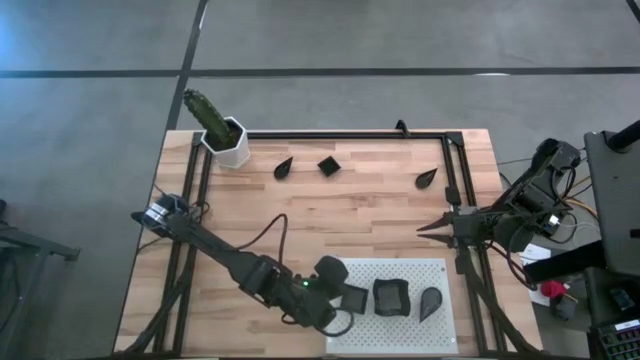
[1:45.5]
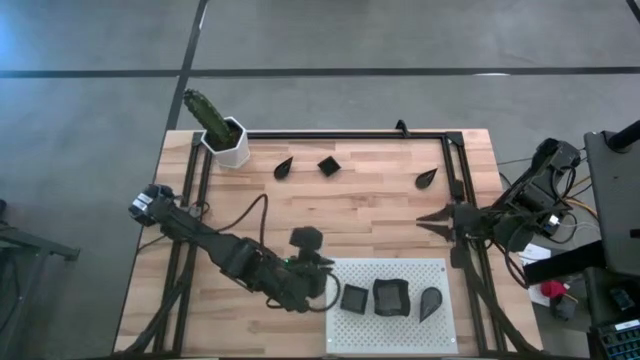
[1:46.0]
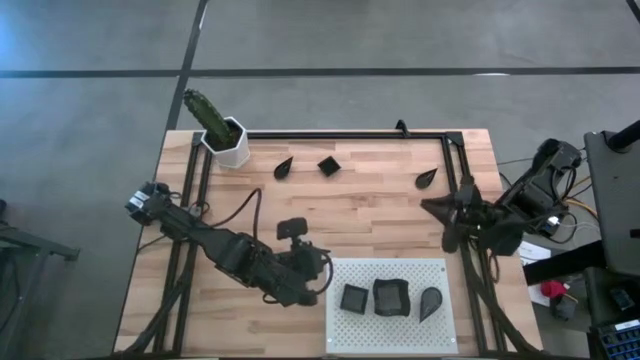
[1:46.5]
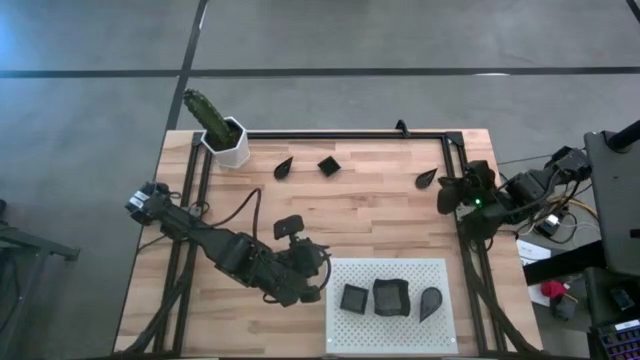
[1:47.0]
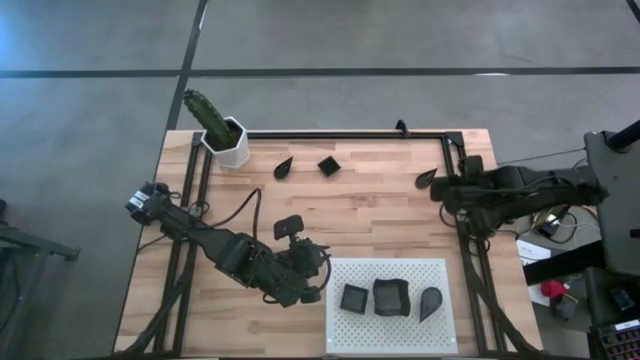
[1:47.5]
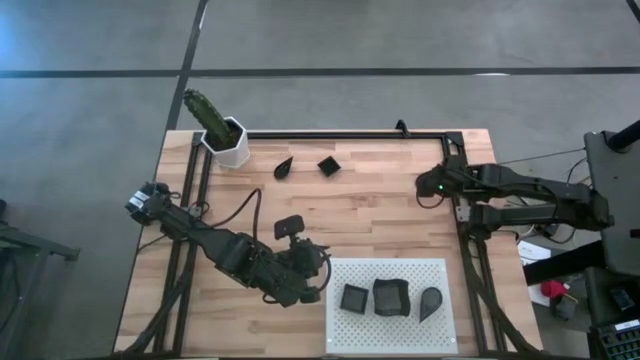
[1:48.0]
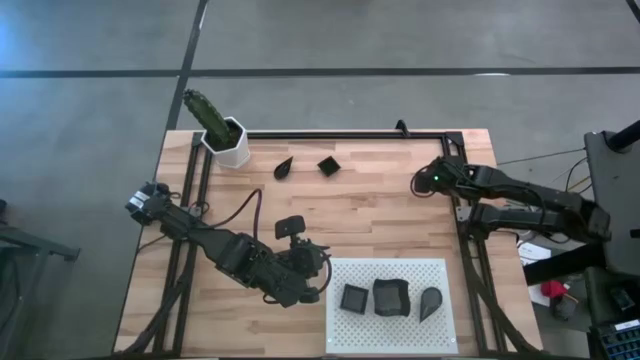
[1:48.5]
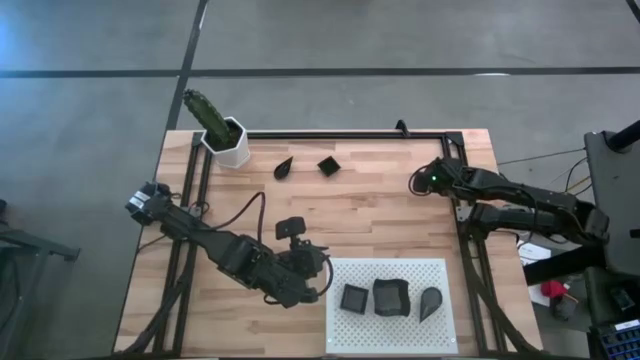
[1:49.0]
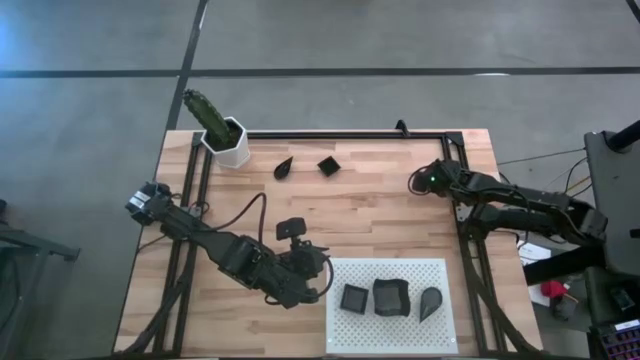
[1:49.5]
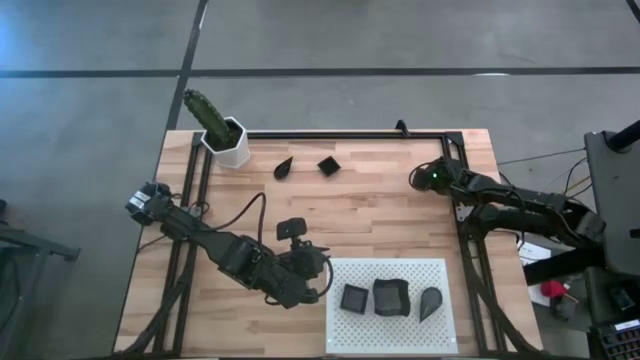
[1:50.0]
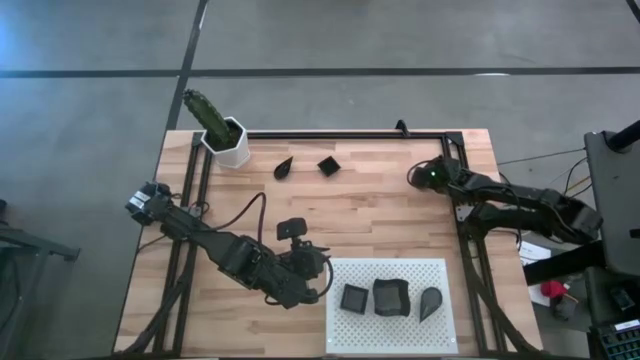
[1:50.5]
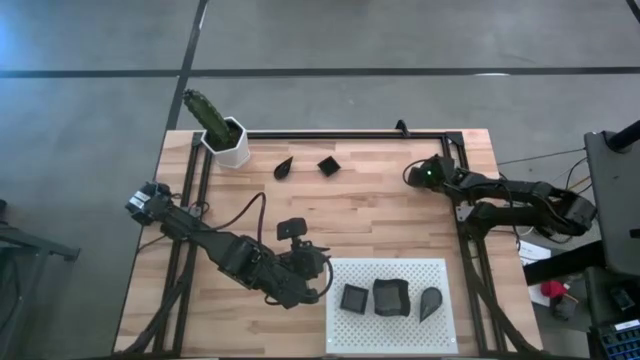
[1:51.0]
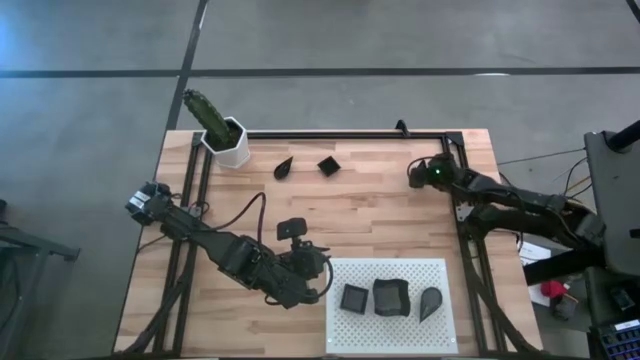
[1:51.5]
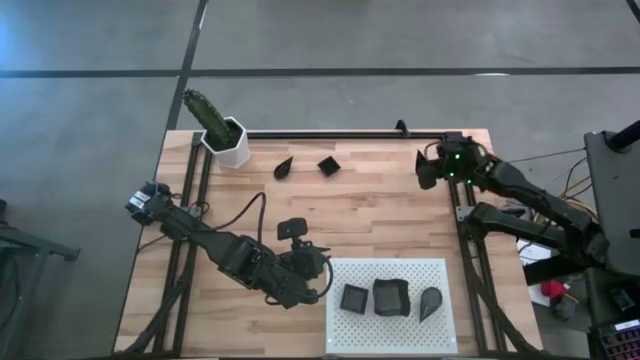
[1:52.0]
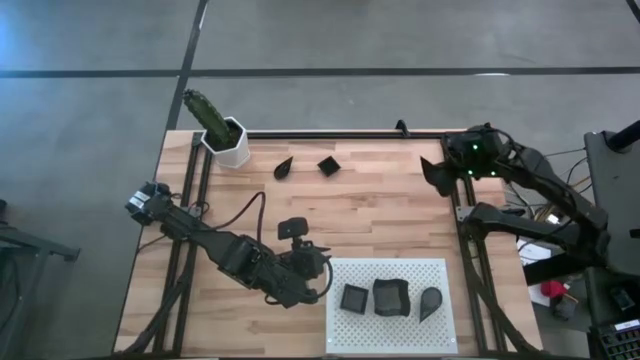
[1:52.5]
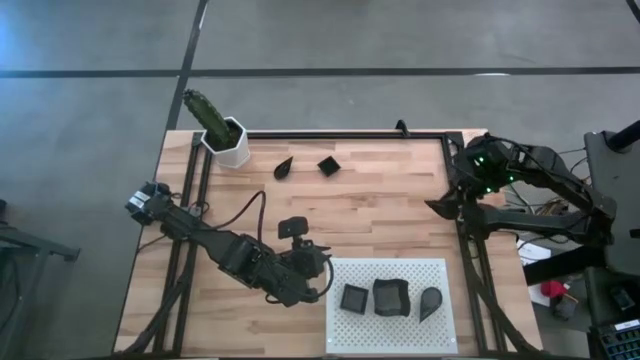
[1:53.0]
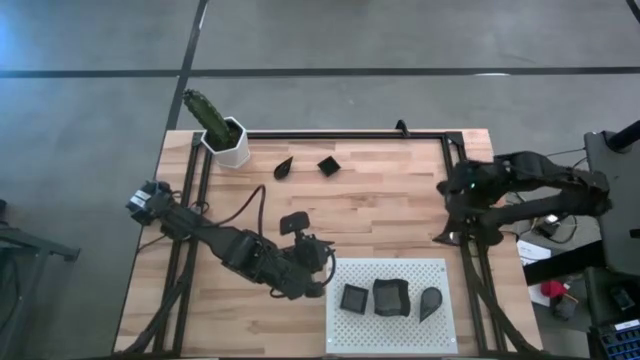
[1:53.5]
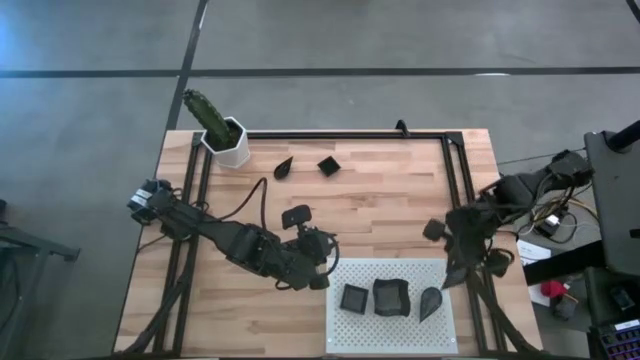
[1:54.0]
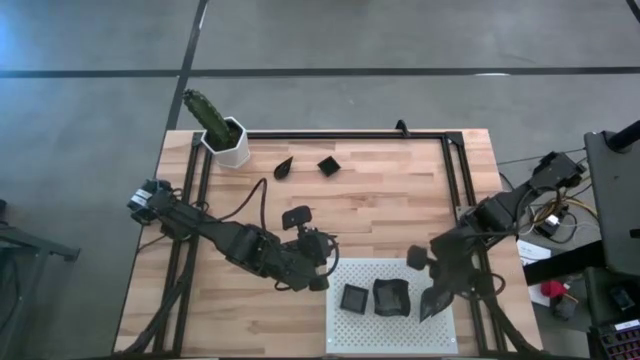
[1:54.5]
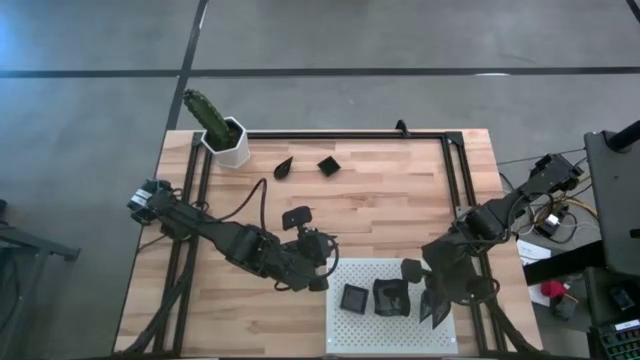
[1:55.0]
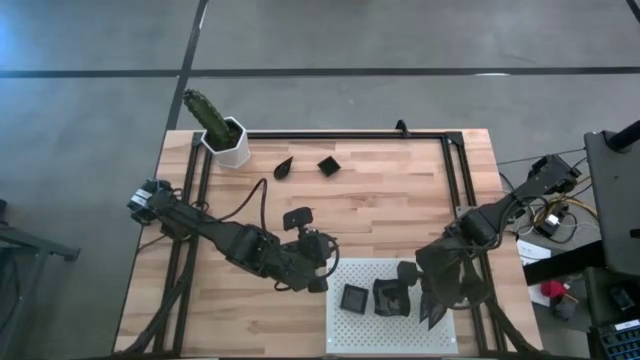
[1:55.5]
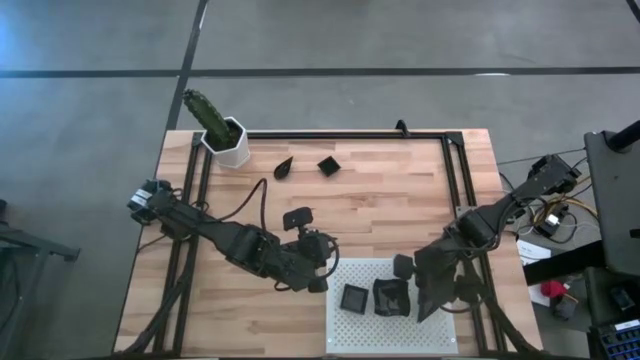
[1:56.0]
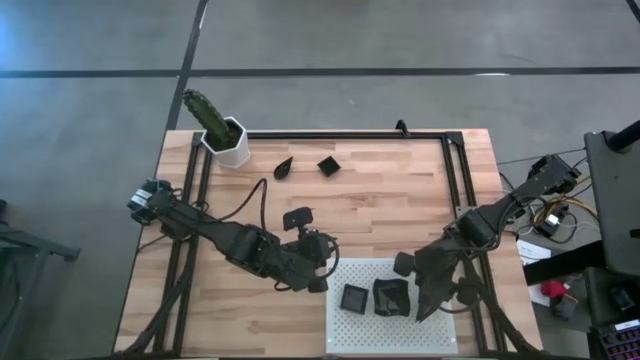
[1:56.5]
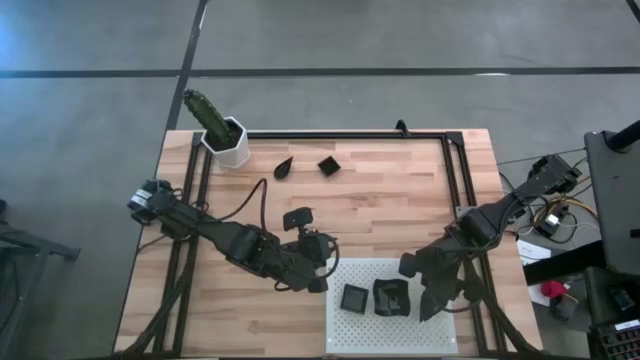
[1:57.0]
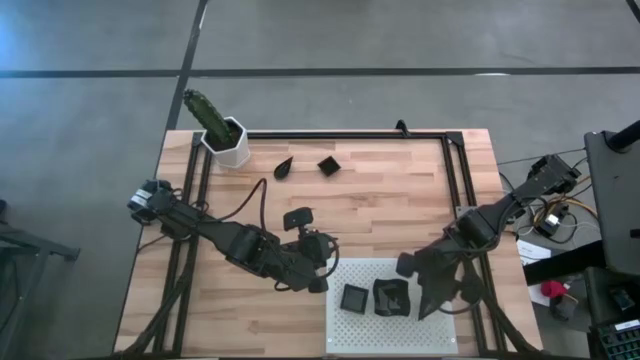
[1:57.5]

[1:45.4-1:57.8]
Task: Pick & Place Mini shaped plates
Stack the drop-shaped plate on top of the drop-shaped plate on the shelf

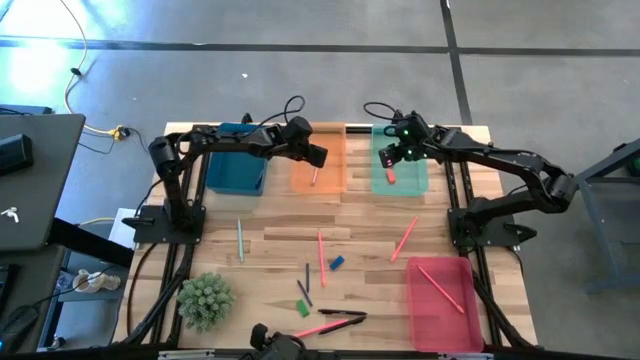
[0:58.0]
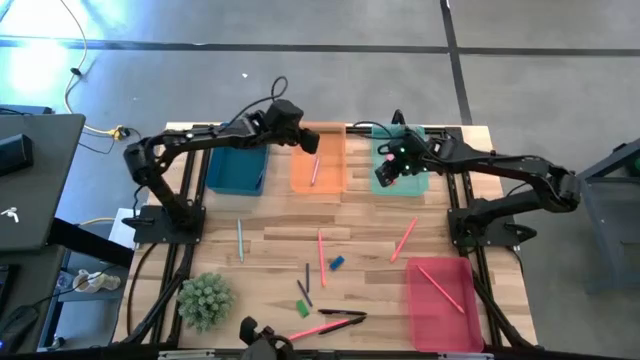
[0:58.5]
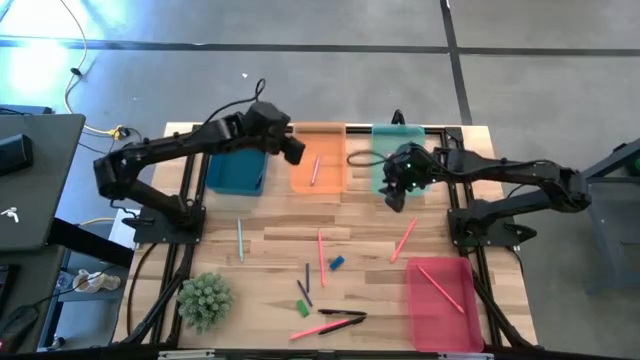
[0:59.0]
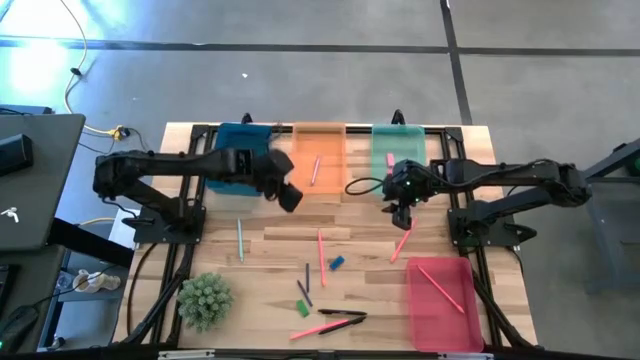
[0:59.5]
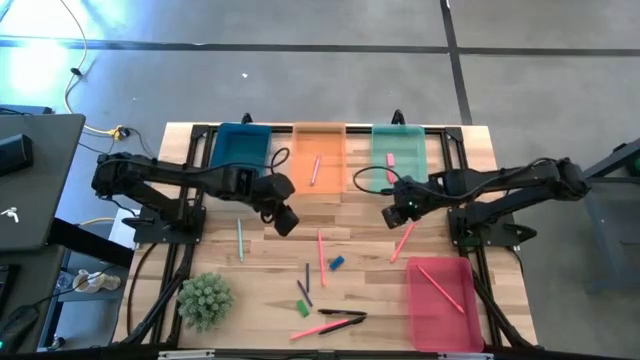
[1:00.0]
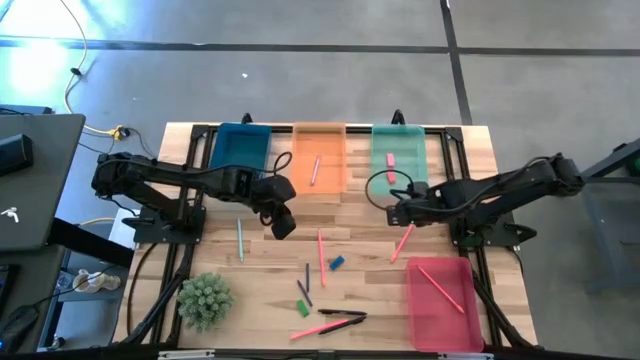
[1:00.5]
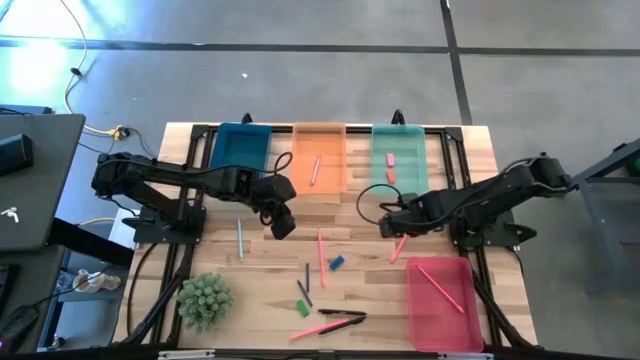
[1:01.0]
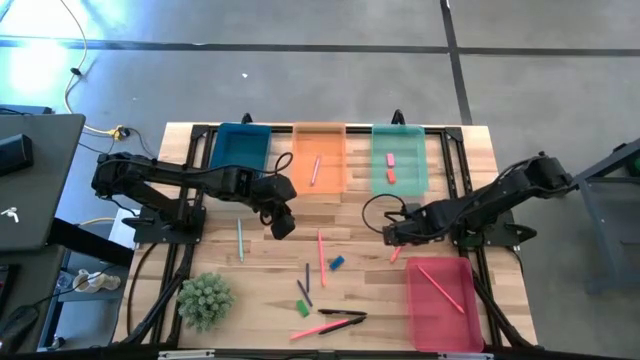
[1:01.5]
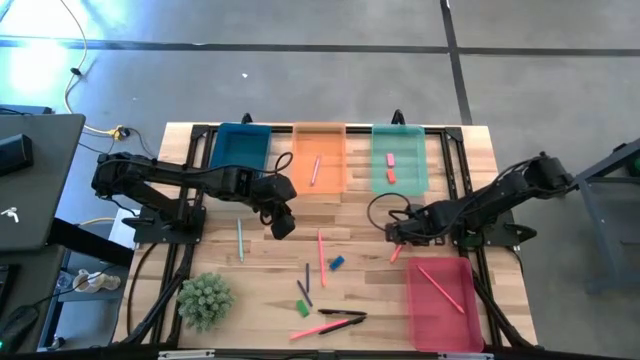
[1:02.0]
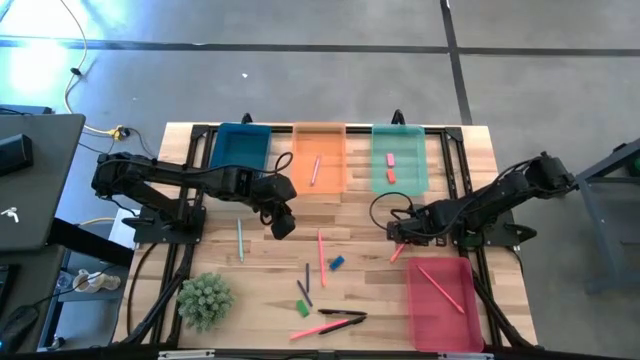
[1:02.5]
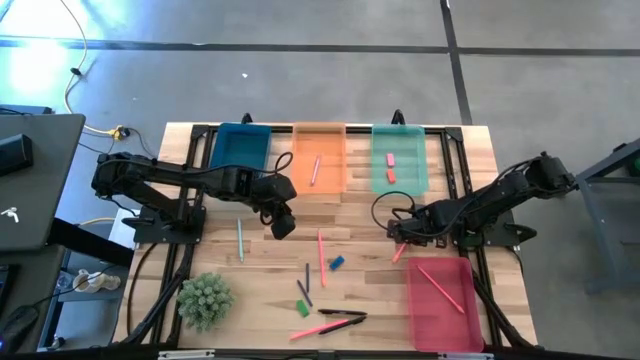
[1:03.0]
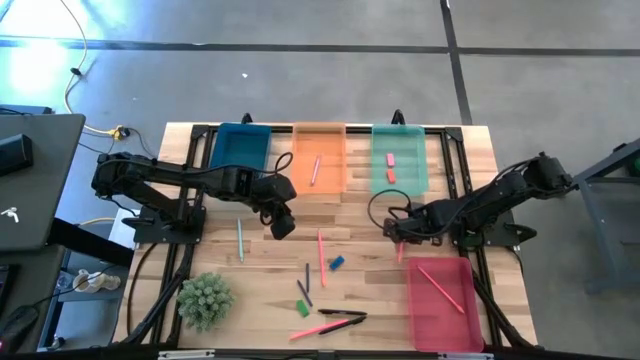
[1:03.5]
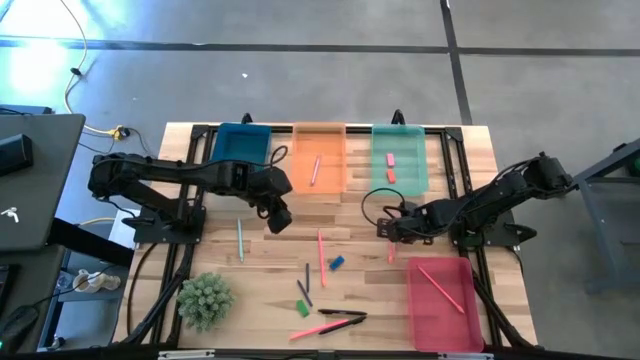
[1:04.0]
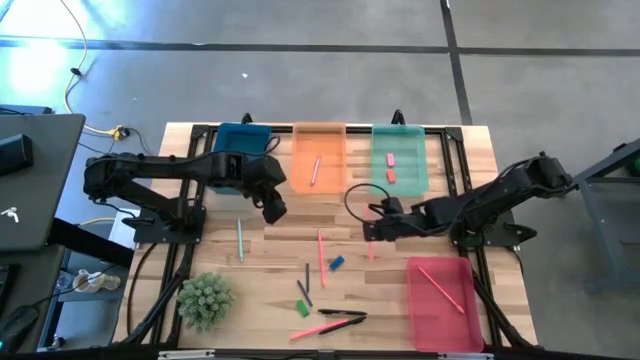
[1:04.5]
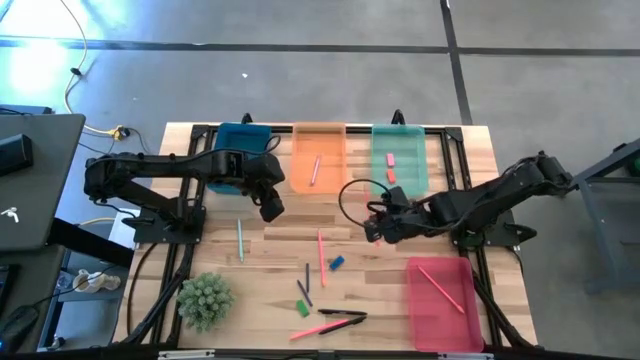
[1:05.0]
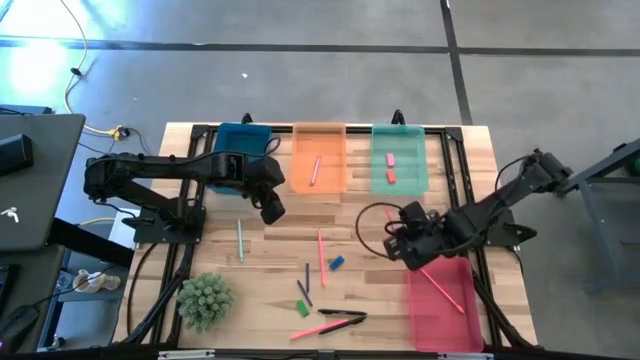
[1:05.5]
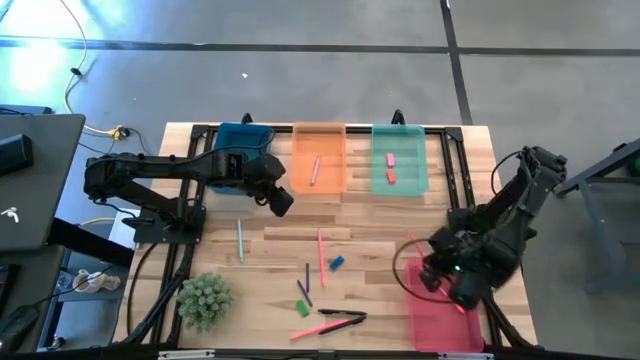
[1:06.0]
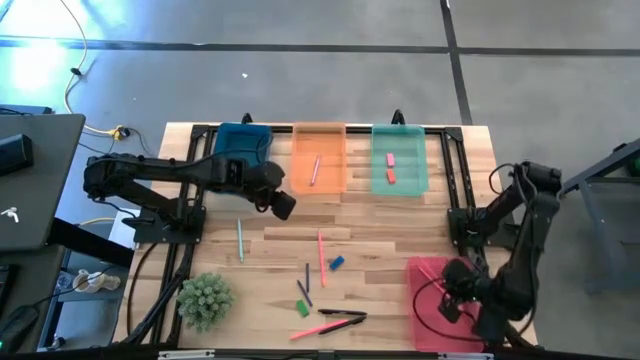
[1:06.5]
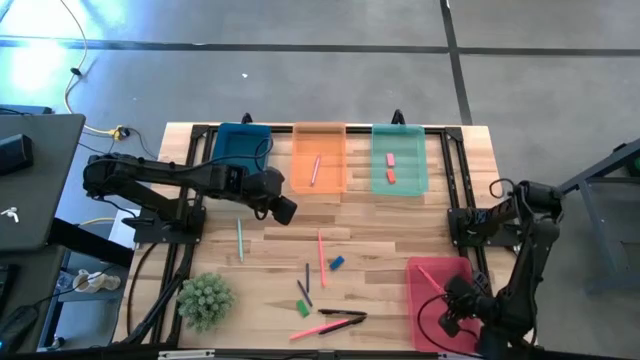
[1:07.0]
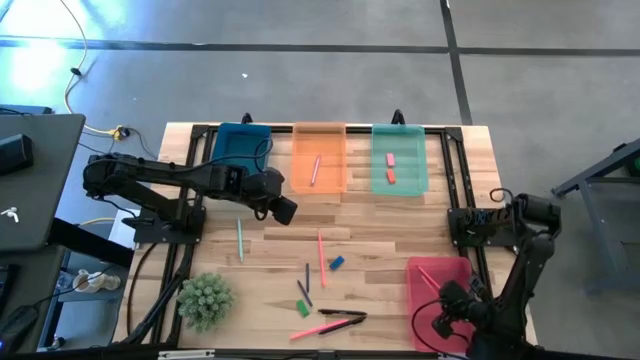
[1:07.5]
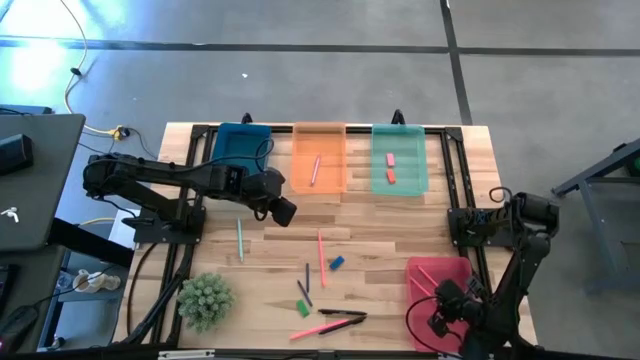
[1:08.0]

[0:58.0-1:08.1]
Task: Sort crayons/erasers/pens/pencils in bins
Put the top right pink pencil into the pink bin
